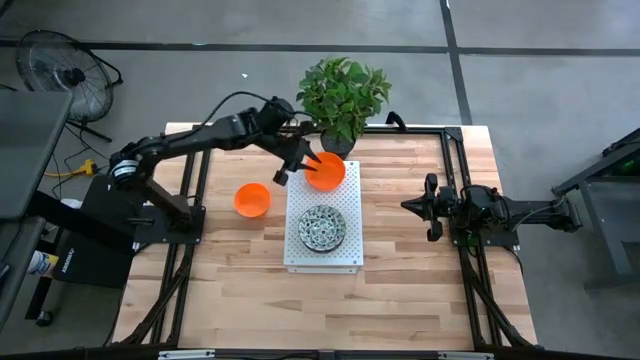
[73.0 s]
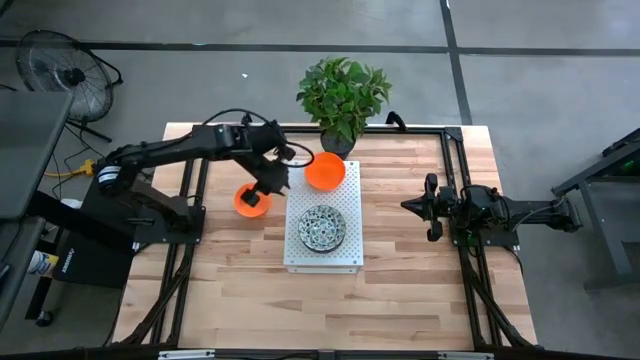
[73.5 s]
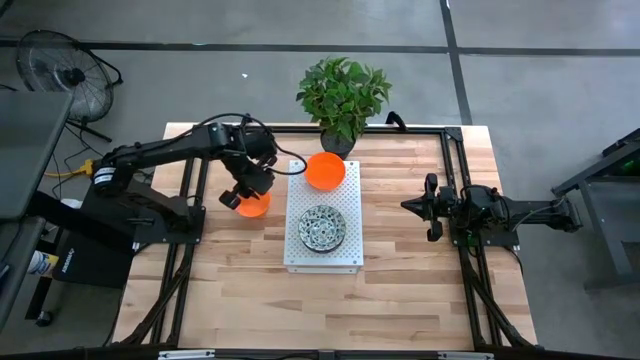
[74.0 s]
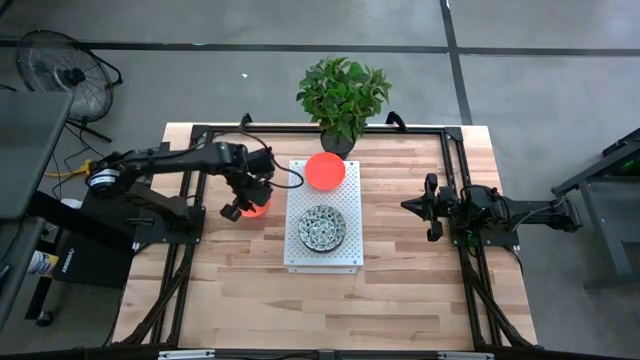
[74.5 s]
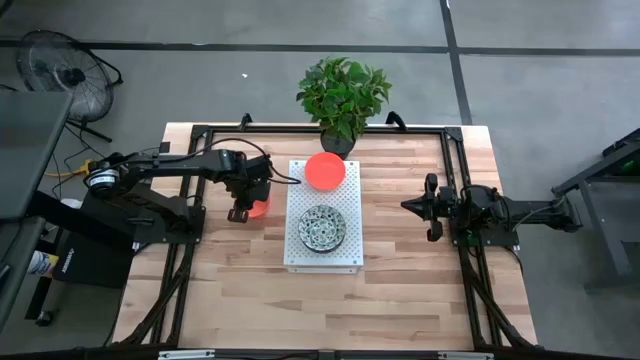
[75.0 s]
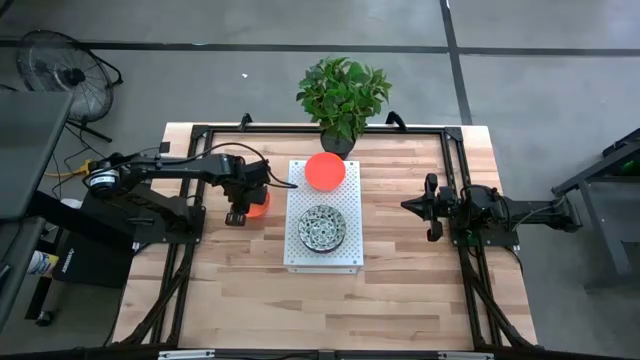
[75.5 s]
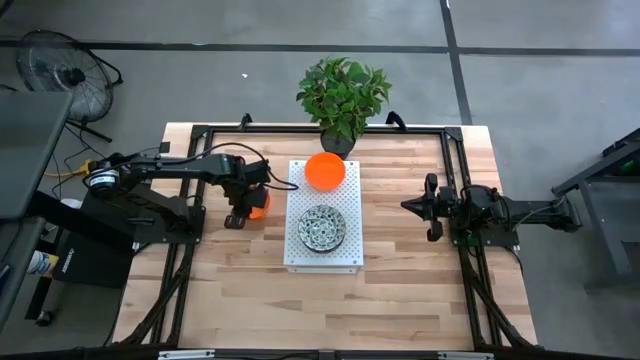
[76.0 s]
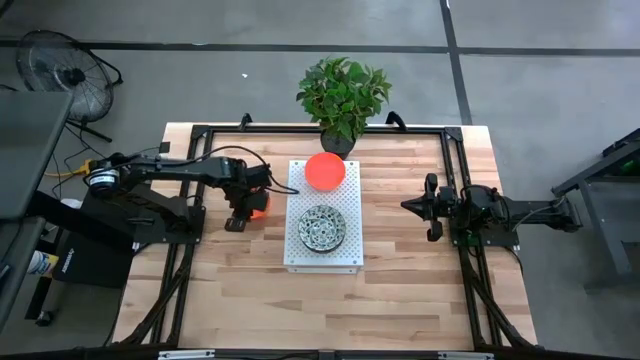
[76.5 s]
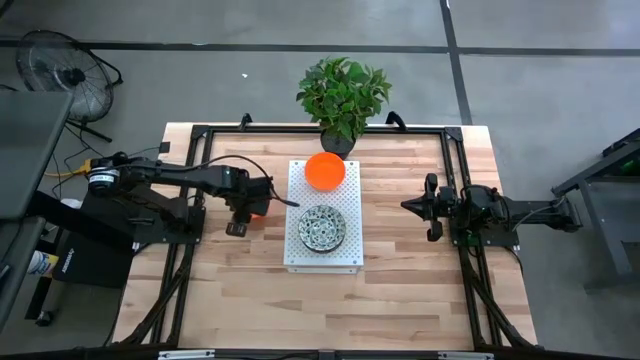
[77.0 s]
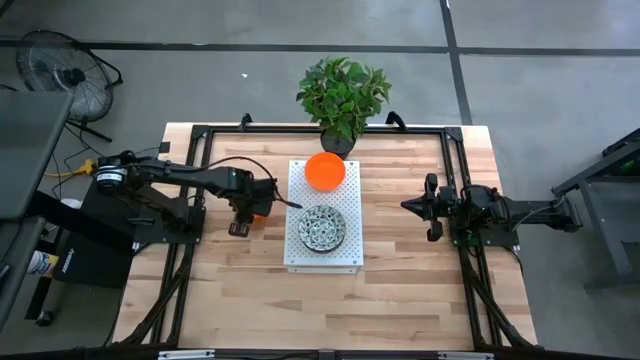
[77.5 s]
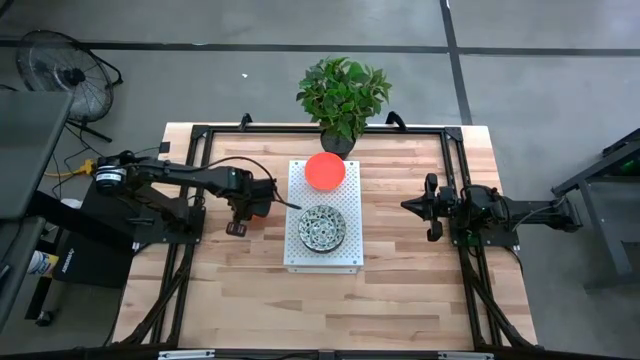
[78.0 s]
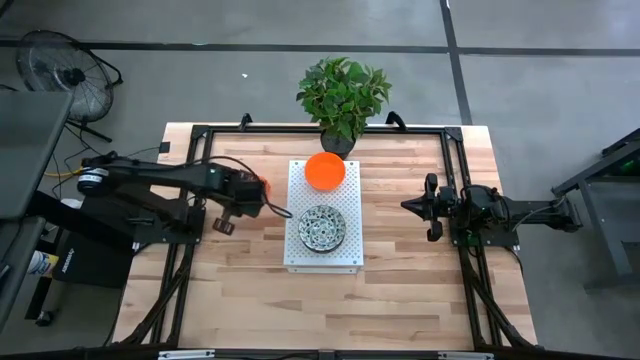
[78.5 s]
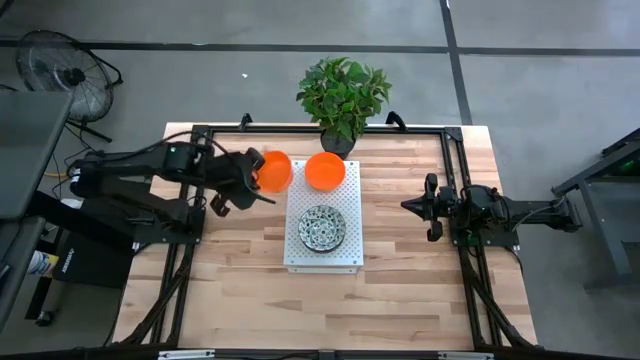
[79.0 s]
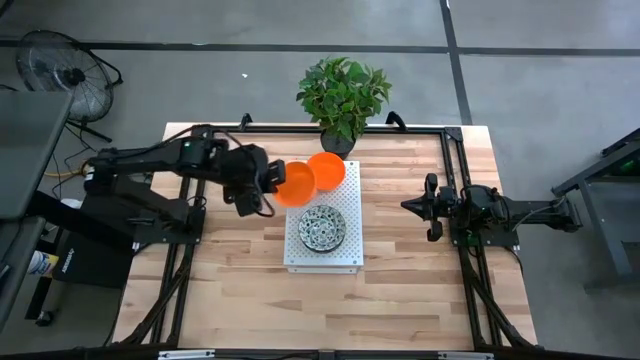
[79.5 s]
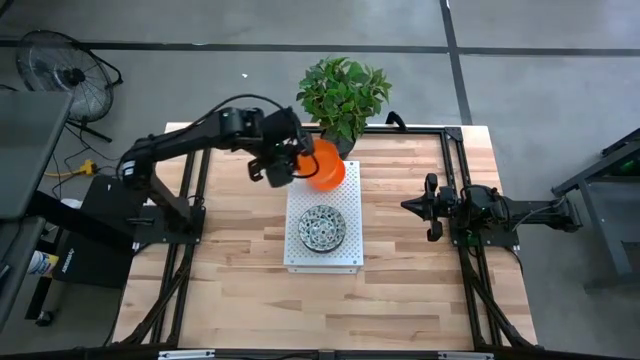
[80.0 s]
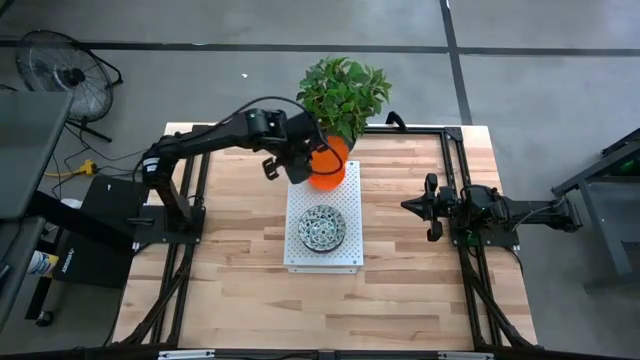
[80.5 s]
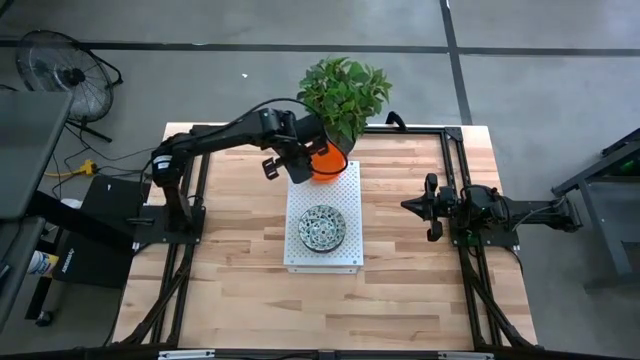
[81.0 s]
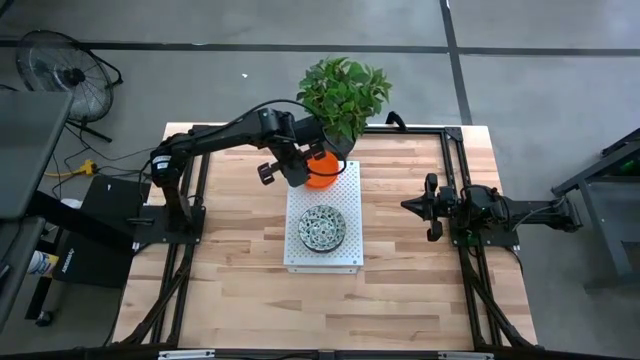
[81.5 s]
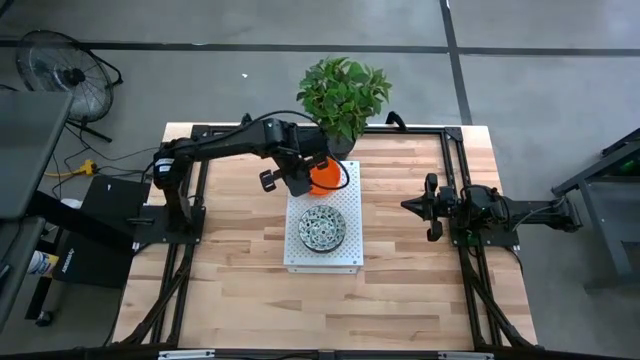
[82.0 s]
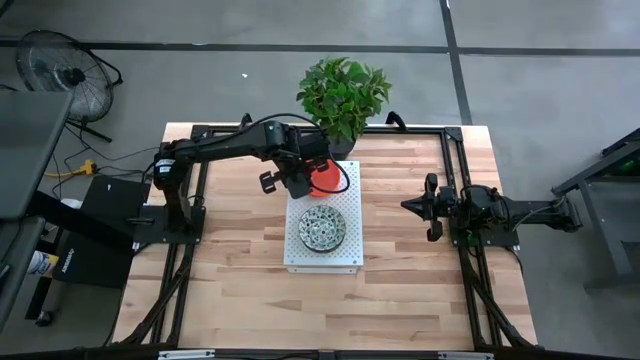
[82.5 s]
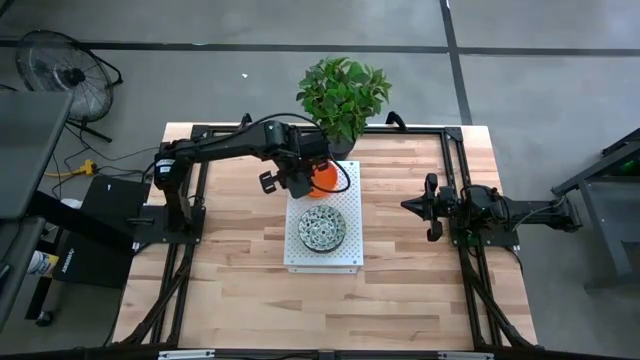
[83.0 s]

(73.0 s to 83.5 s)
Task: Pick & Place Mini bowls
Stack the orange bowl on top of the orange bowl on the shelf

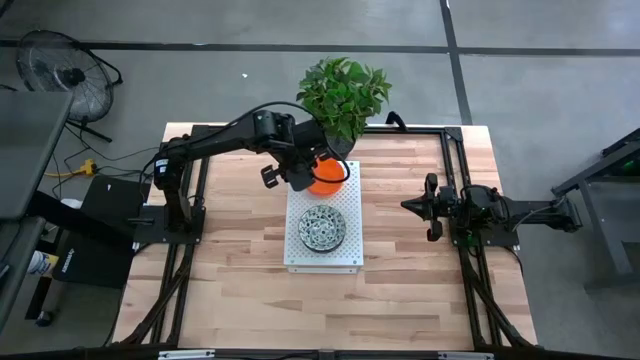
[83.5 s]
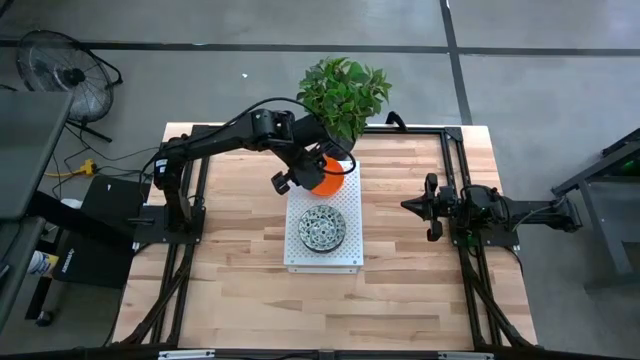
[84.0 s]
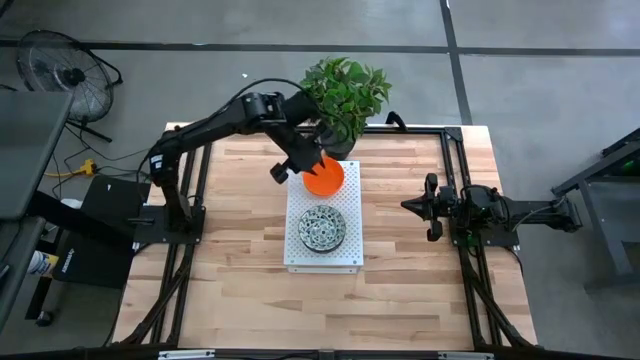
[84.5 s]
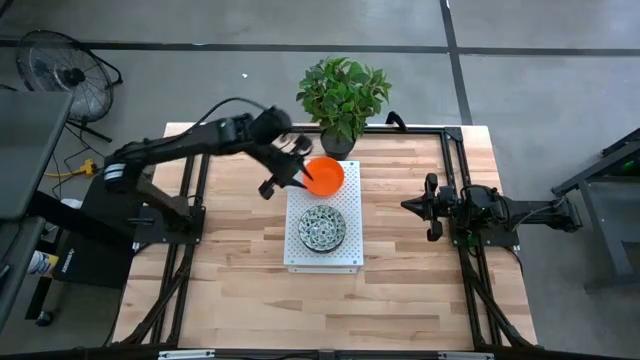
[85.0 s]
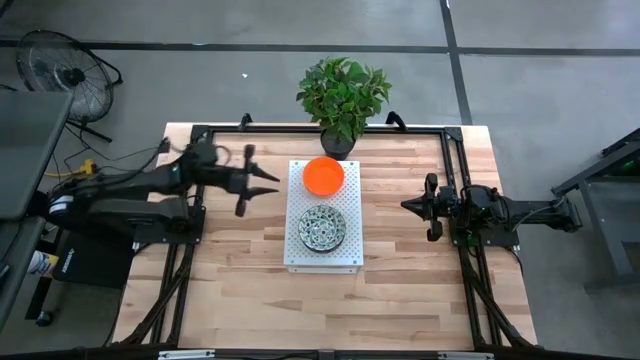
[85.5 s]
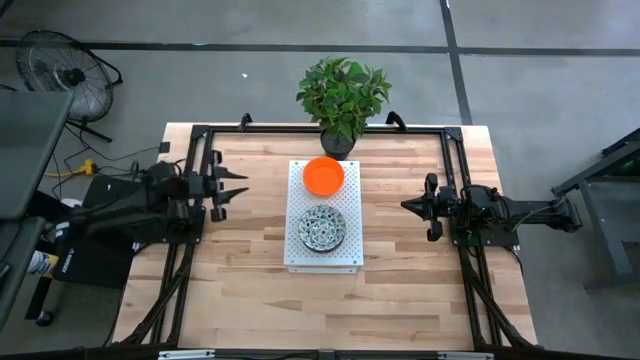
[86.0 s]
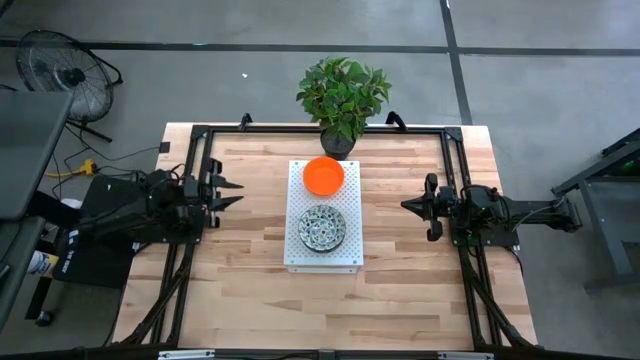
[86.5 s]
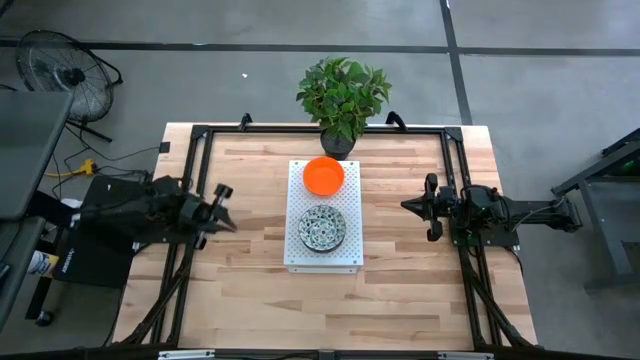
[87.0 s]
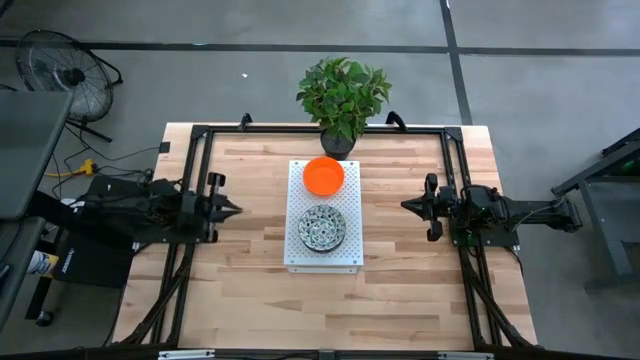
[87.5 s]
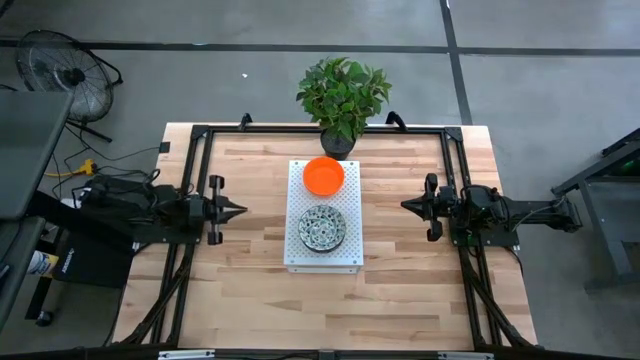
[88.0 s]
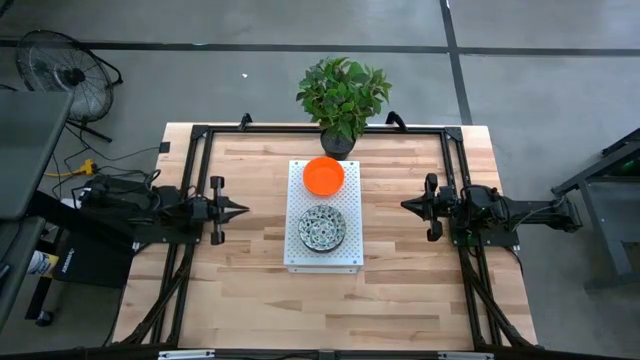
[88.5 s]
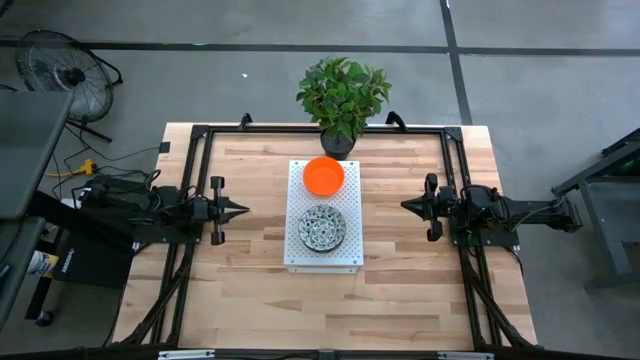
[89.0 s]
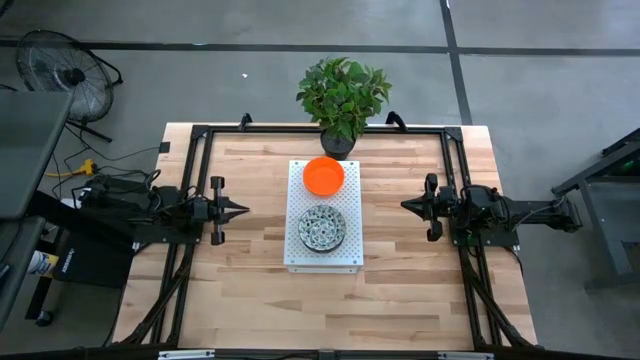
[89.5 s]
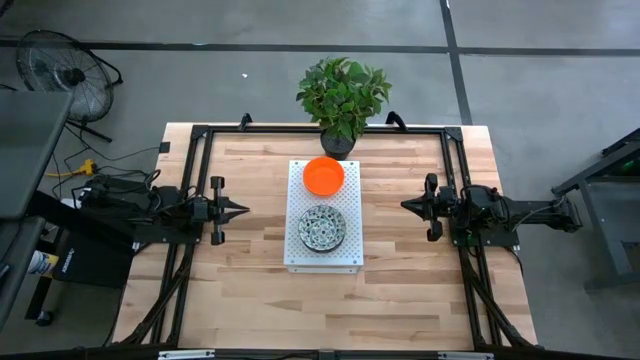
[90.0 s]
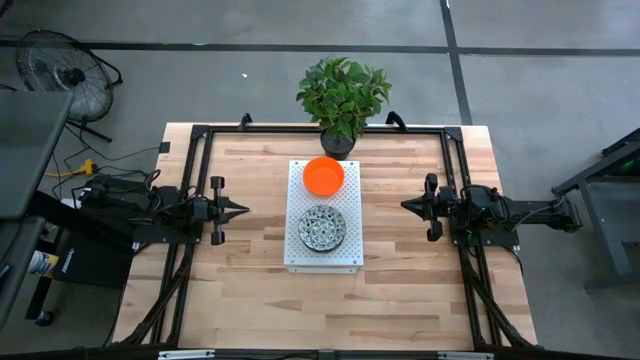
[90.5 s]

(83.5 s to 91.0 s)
Return to Home Position

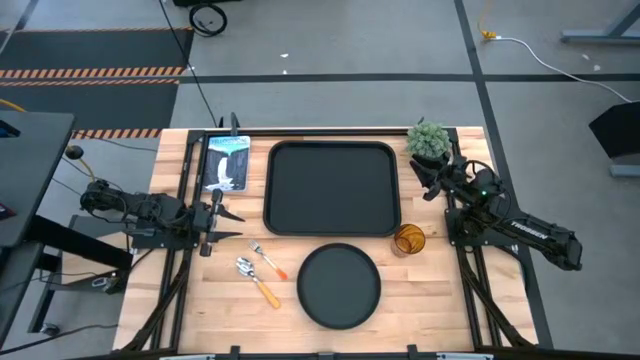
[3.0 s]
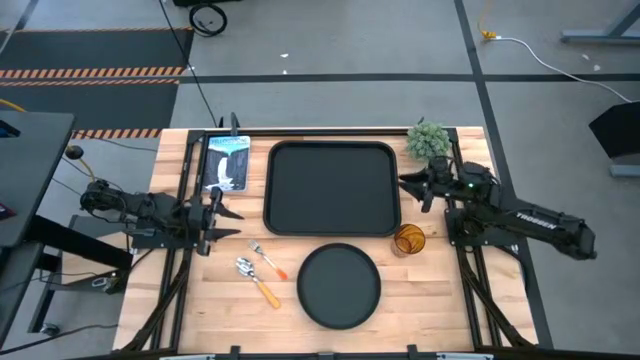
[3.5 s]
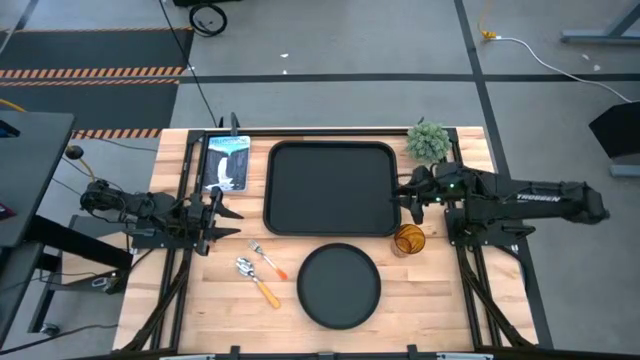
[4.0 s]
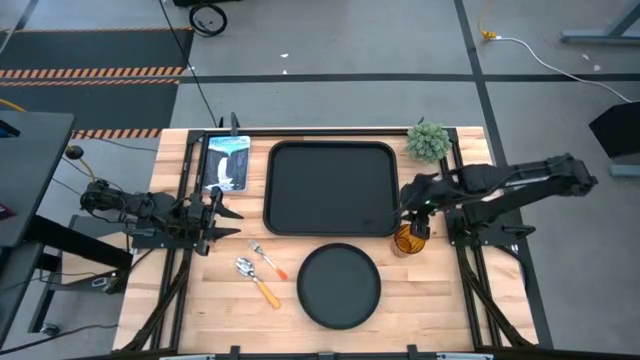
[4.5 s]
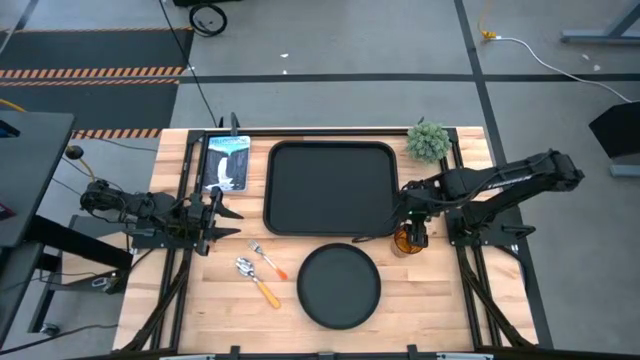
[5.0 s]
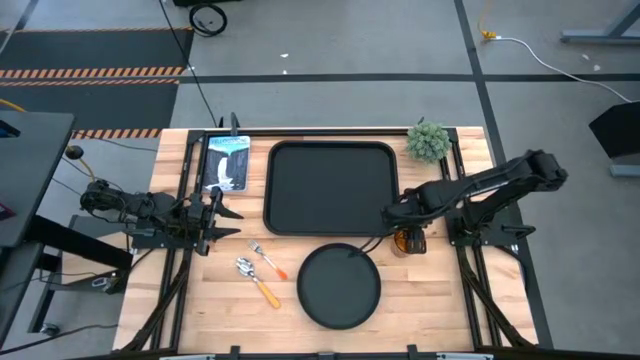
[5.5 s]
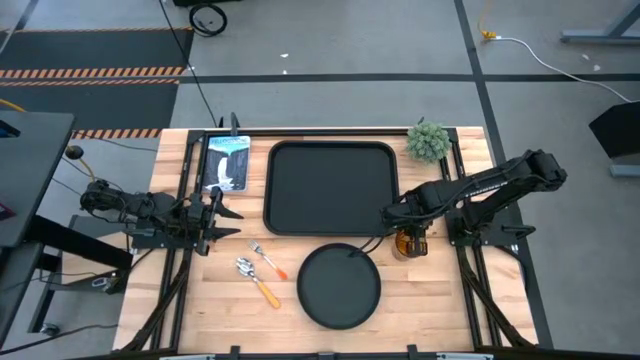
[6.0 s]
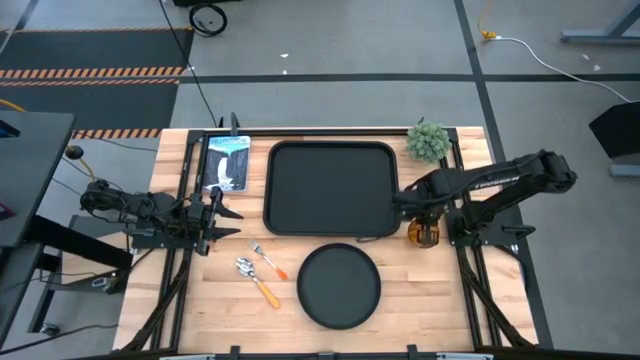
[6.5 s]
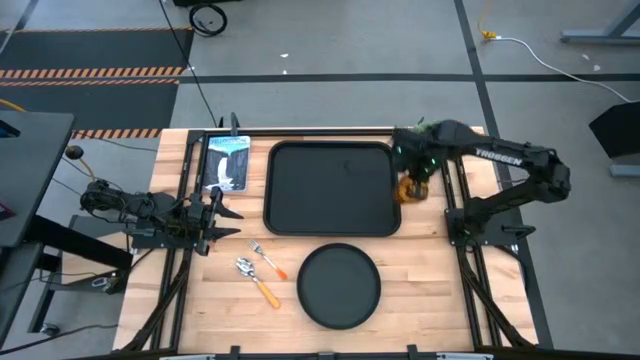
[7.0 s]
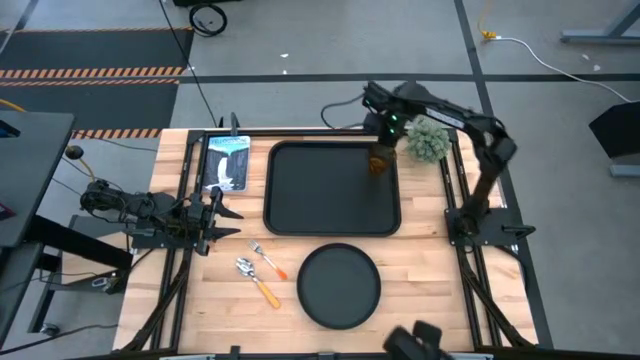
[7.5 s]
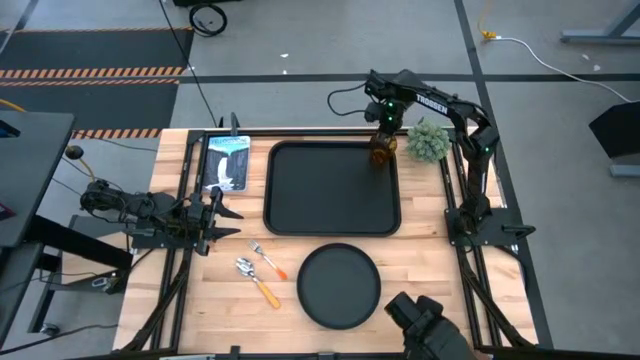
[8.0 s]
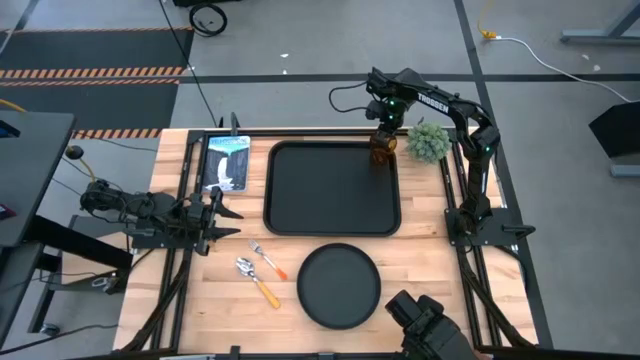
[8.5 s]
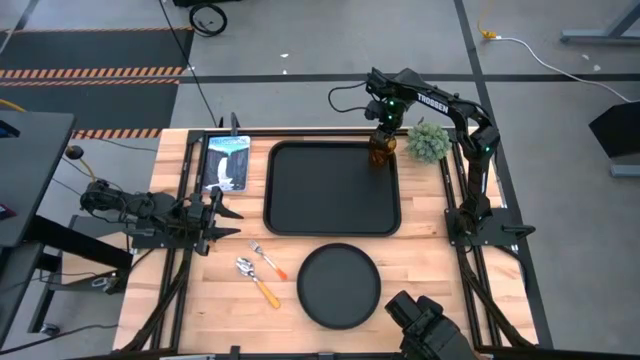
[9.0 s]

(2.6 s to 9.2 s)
Task: Pick and place plate/cup/fork/spoon on tray
Put the brown cup on the black serving tray
